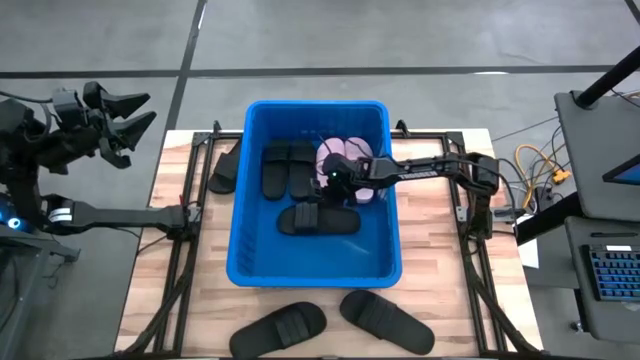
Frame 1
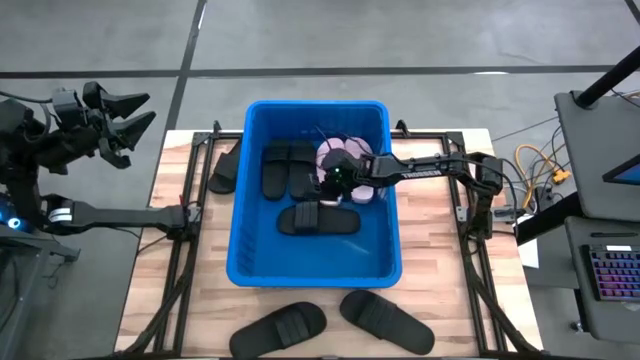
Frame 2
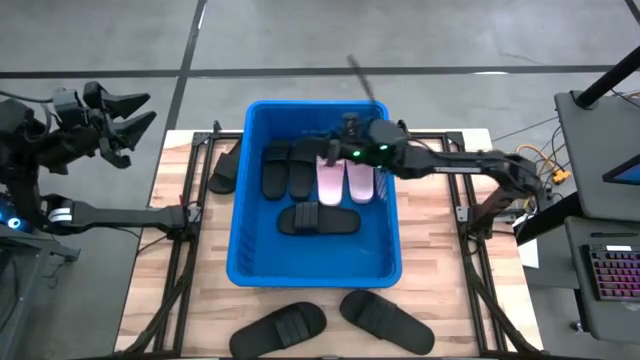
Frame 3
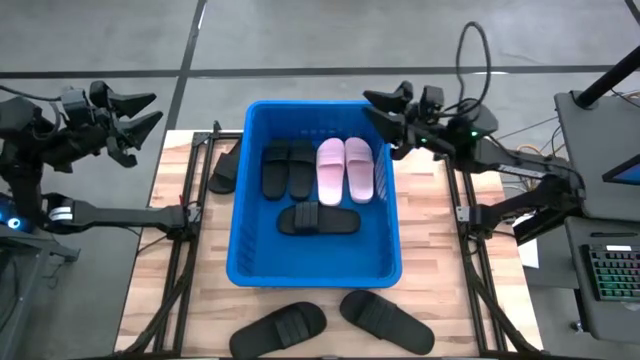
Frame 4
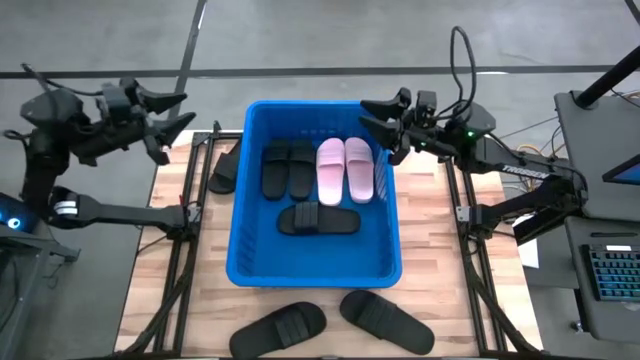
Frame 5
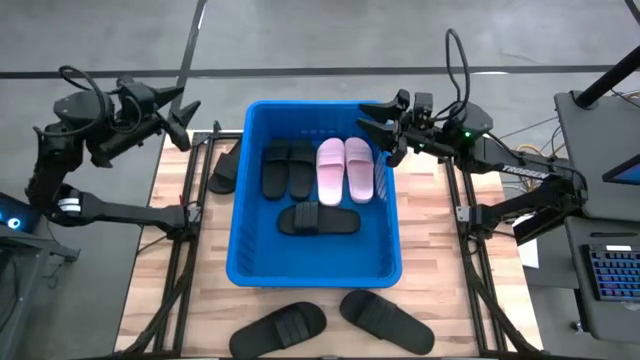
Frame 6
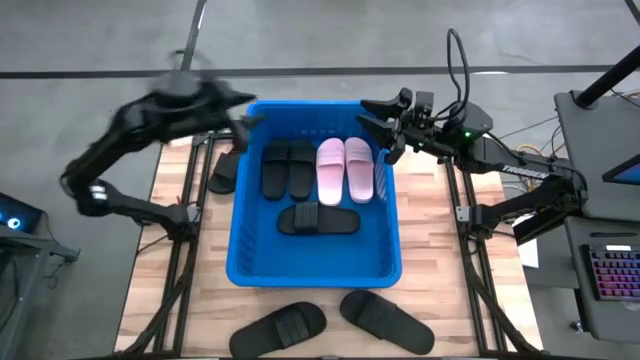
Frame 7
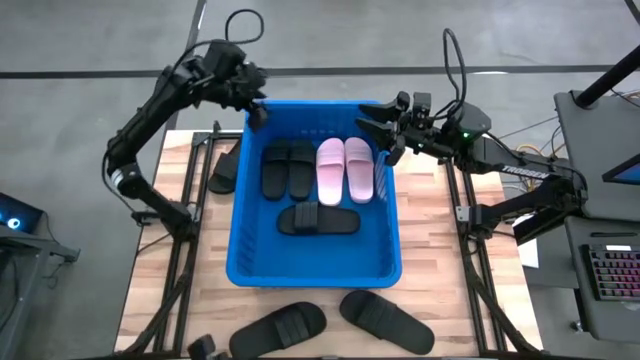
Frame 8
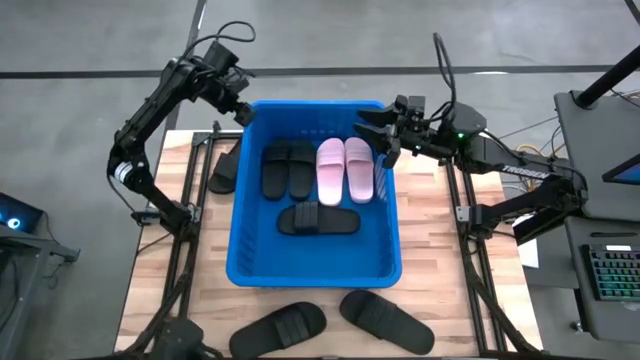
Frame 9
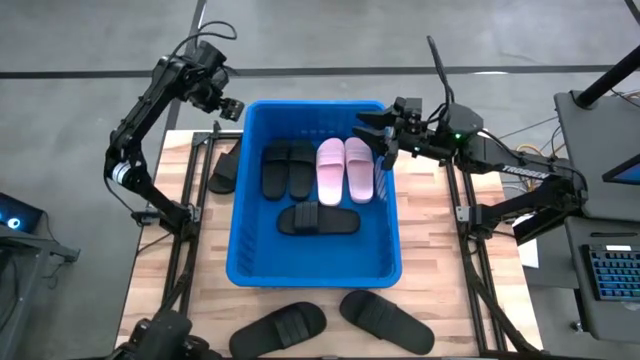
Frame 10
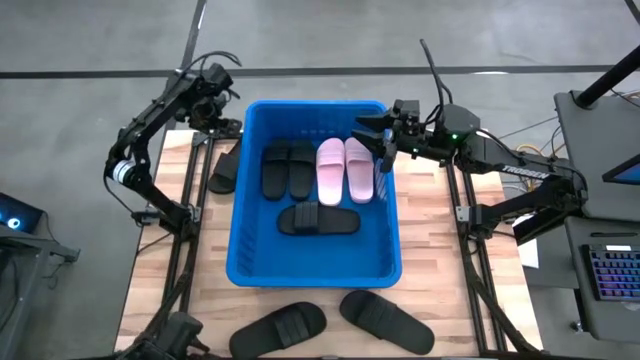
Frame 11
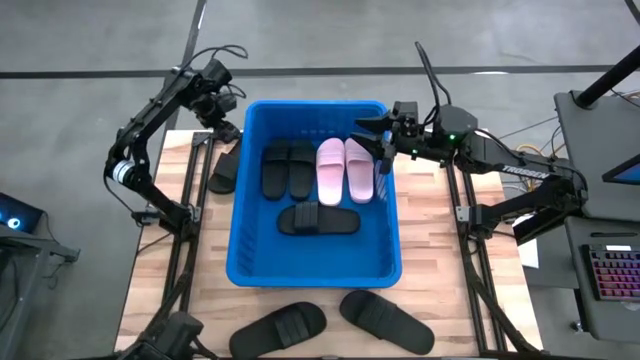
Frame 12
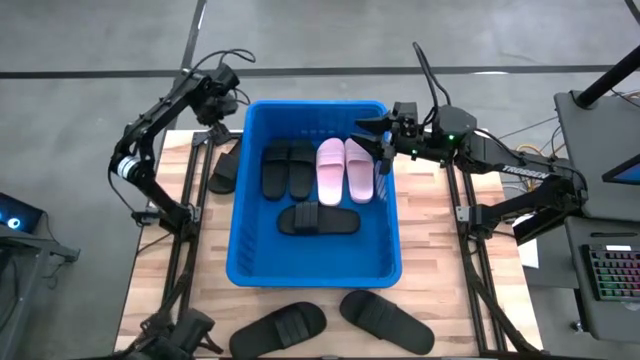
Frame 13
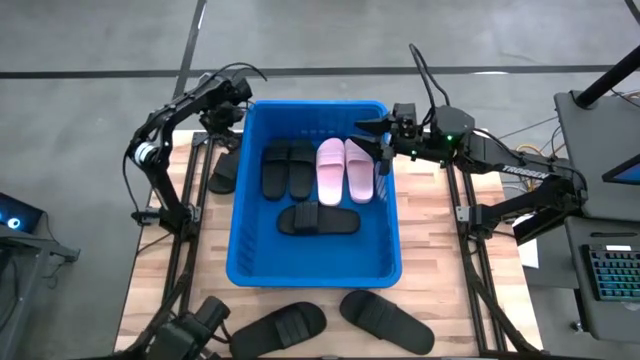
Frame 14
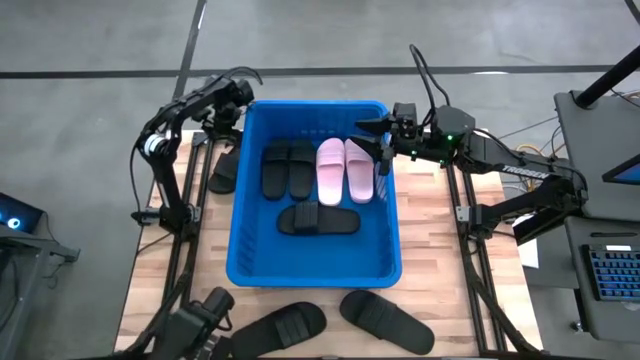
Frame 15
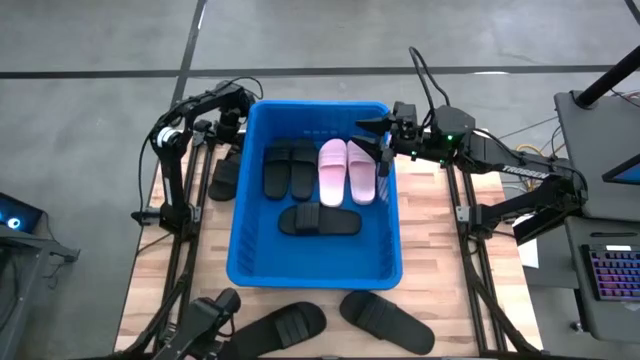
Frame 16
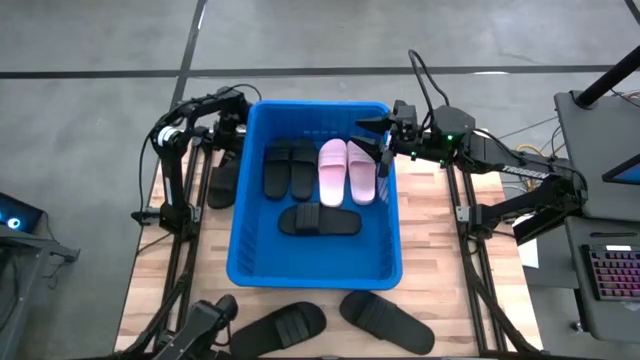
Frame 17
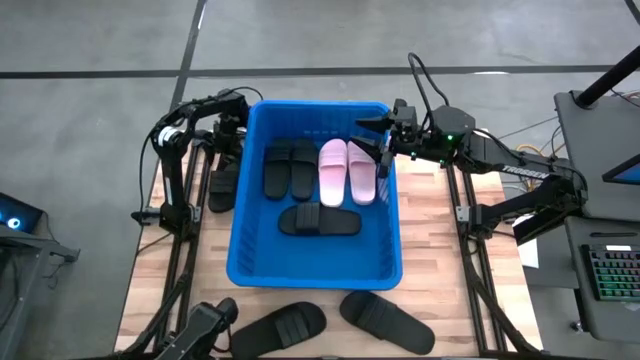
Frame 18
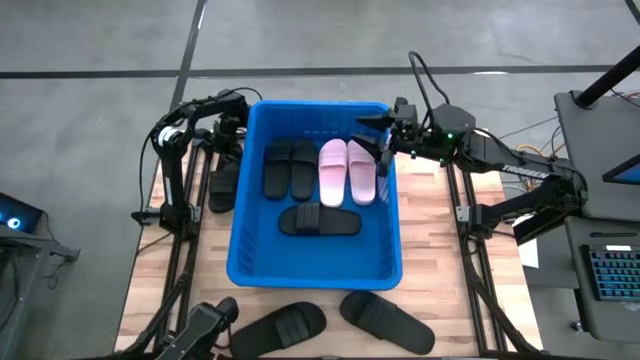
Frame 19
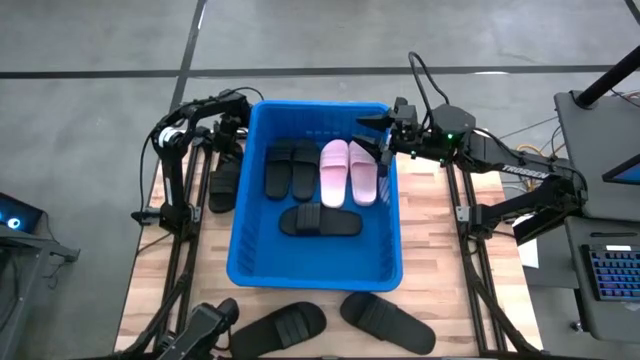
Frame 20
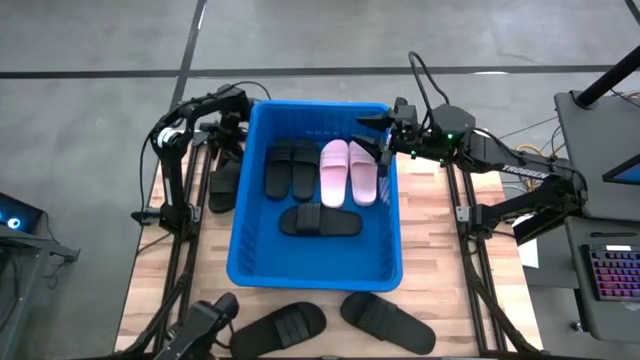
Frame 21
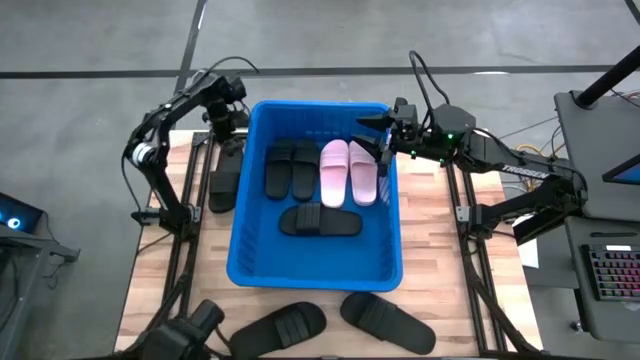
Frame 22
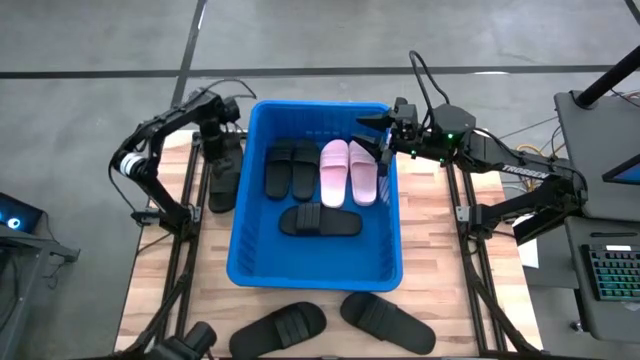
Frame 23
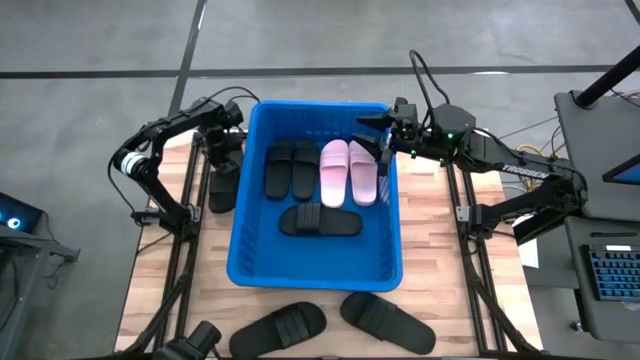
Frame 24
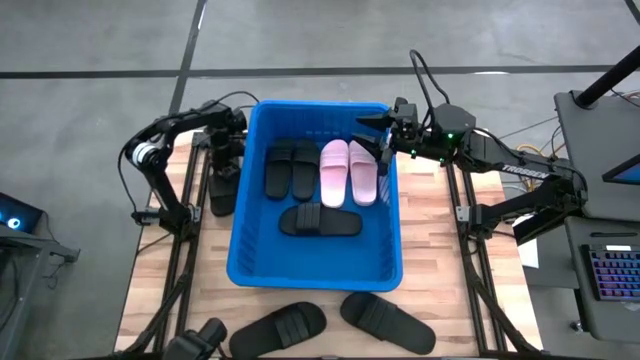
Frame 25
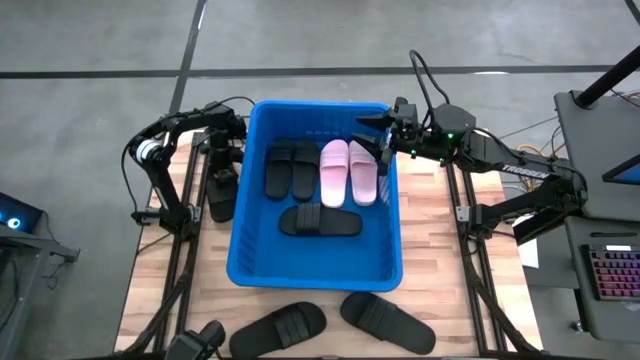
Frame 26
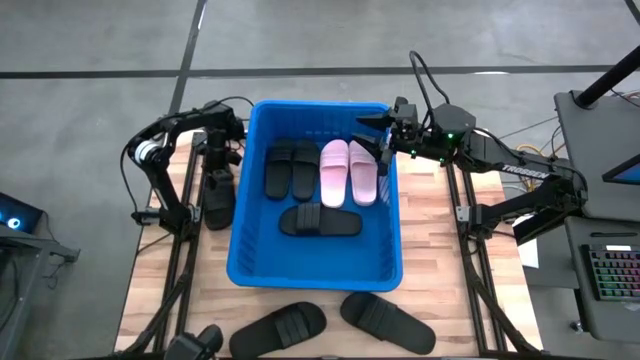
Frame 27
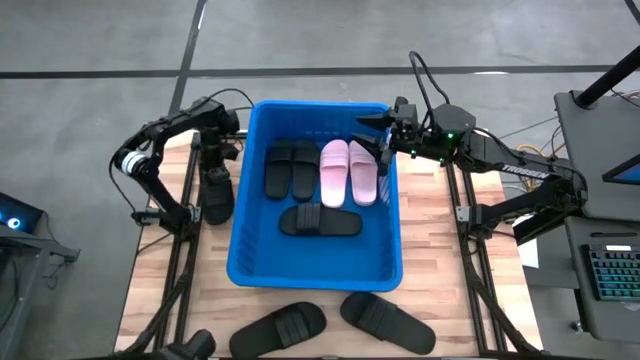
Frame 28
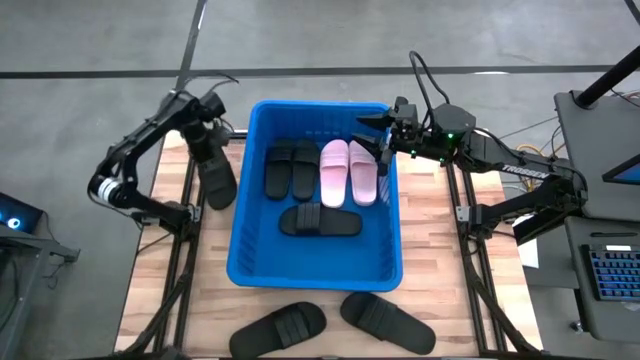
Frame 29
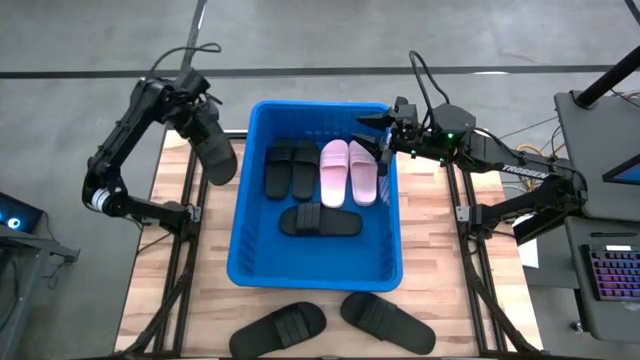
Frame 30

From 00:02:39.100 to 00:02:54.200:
Task: Pick and place slides into bin
Put the black slide into the blue bin

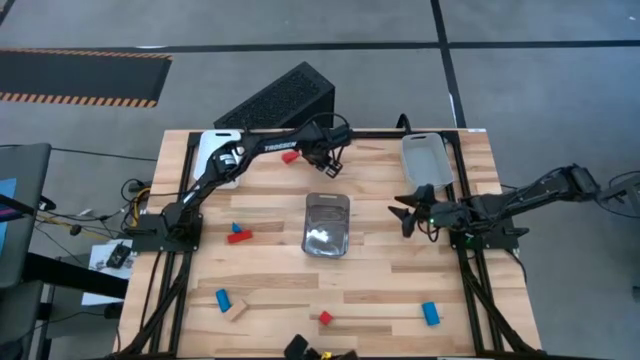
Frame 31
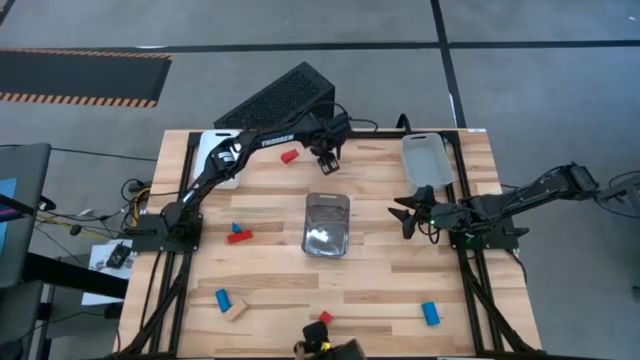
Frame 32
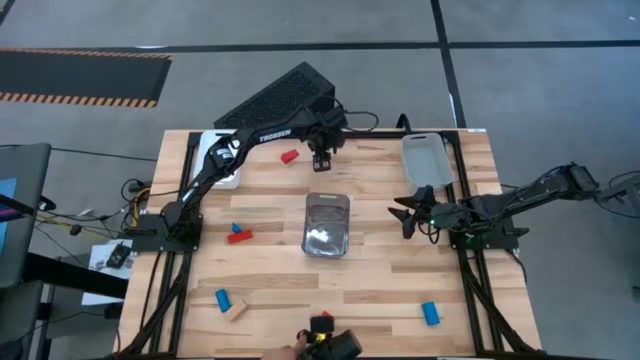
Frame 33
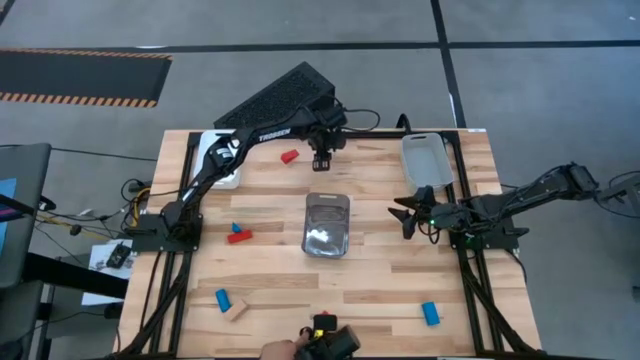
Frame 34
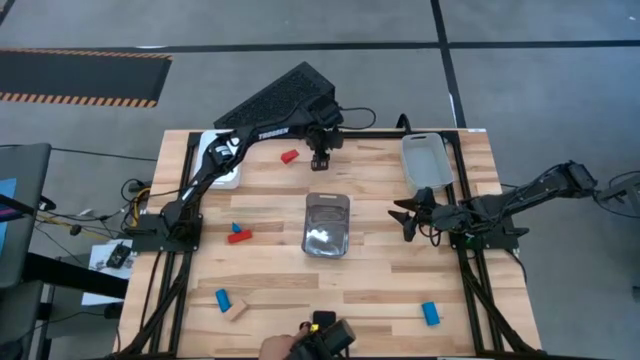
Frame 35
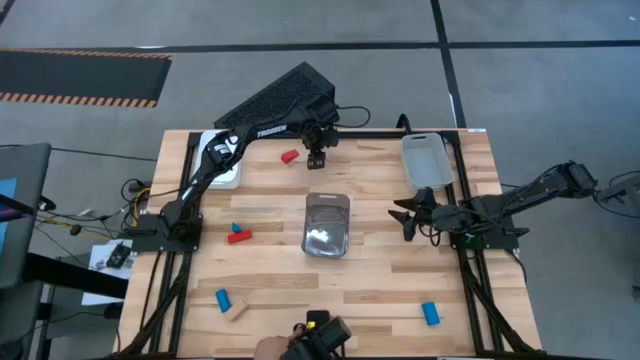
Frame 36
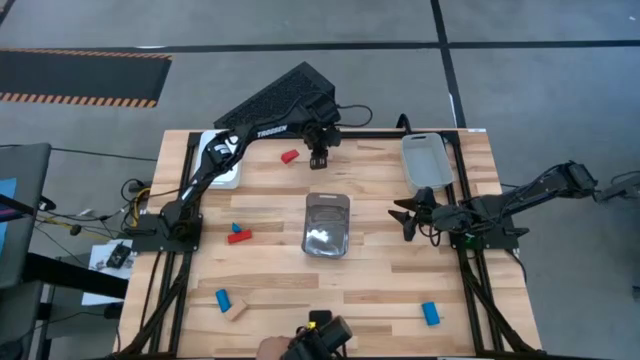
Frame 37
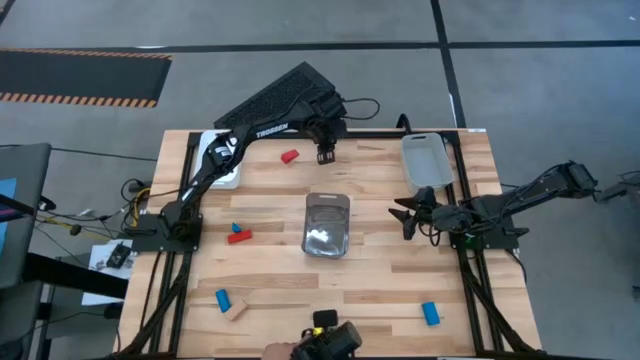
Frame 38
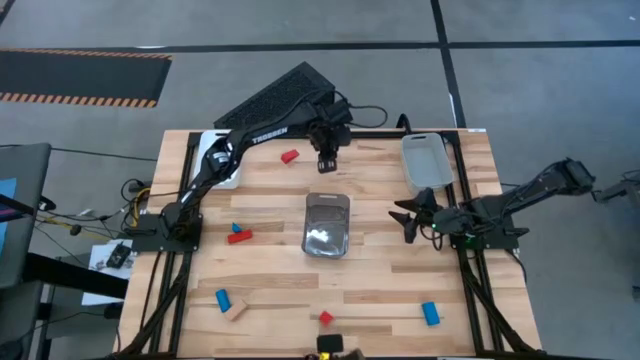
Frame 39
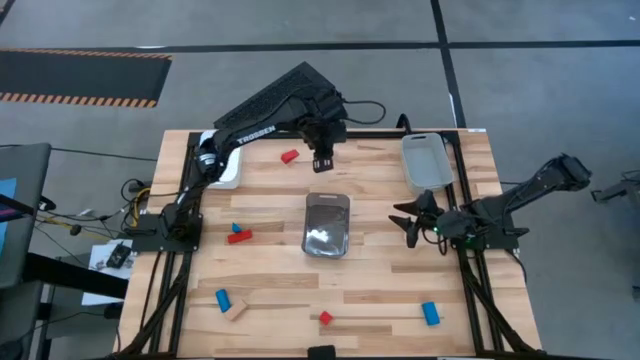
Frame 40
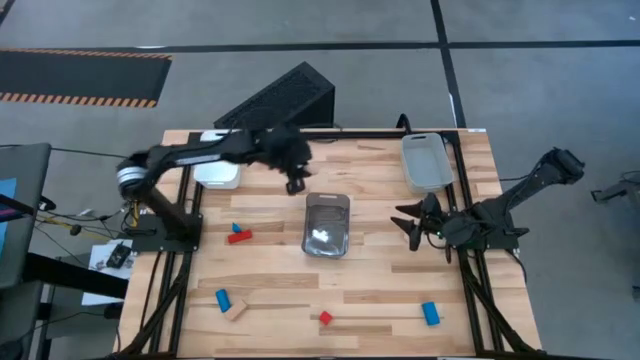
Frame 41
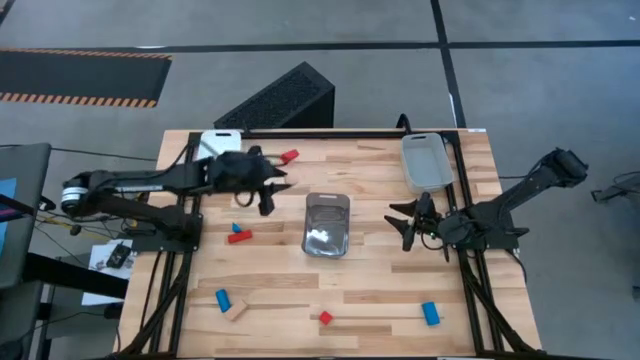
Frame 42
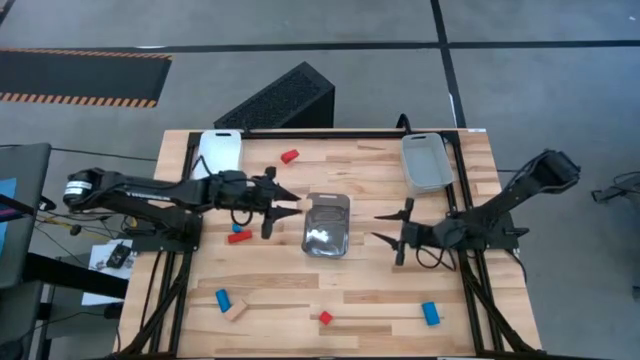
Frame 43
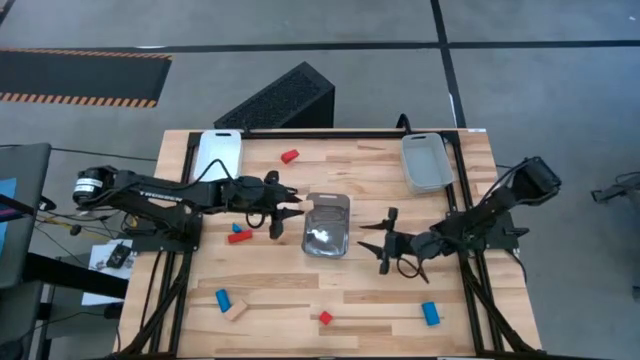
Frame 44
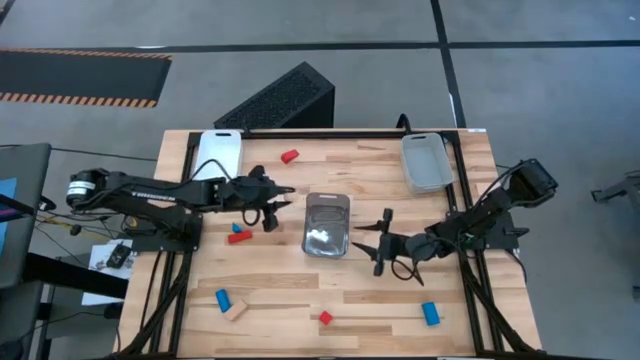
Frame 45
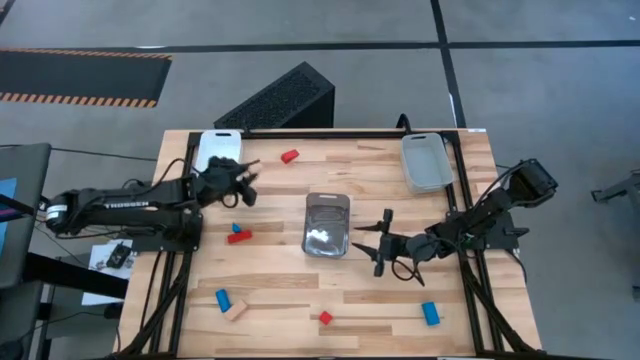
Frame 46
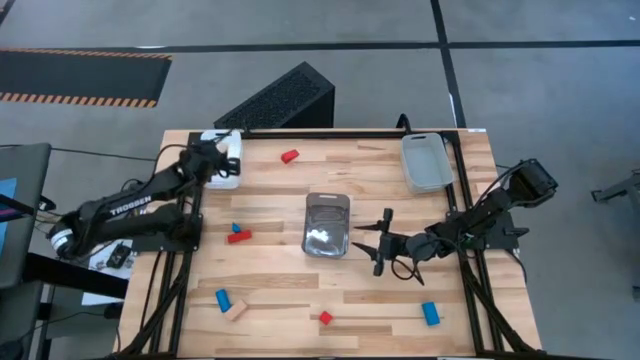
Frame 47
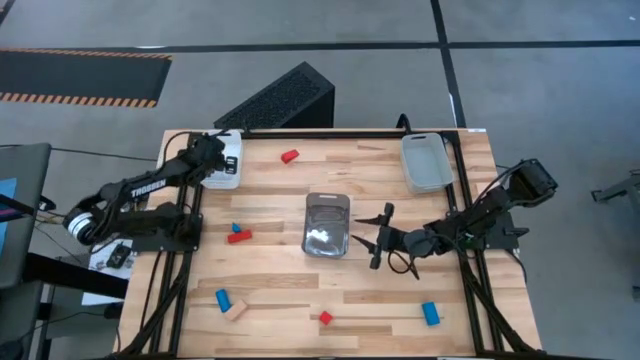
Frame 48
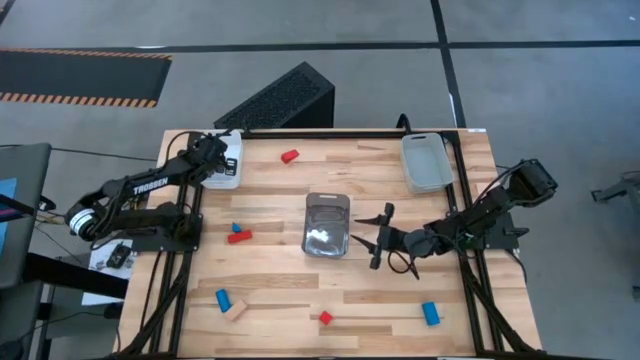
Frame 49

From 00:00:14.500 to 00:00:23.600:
Task: Sort & place blocks by color
Put the top brown block into the white bin
